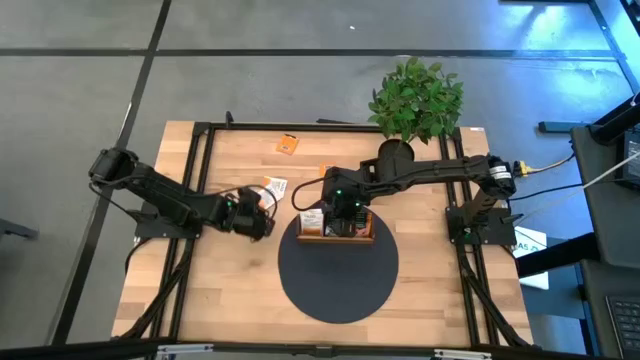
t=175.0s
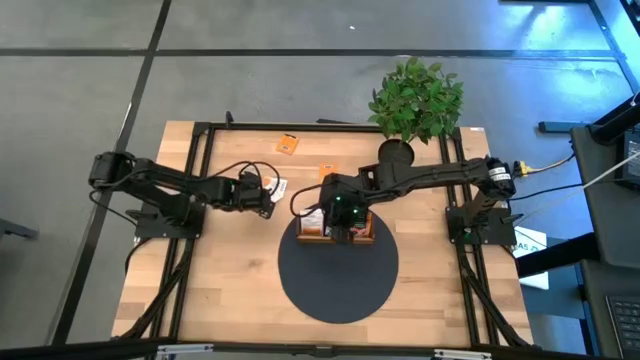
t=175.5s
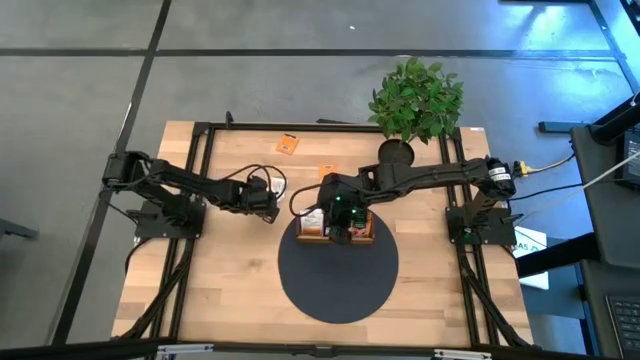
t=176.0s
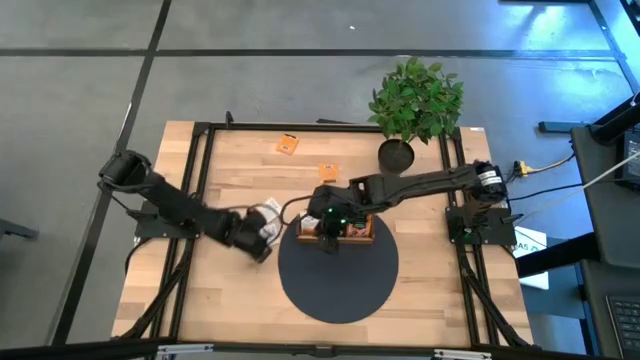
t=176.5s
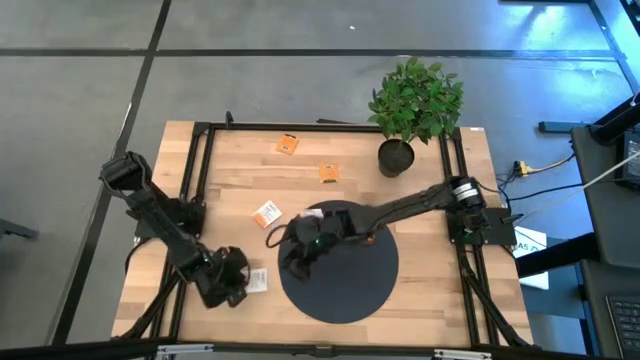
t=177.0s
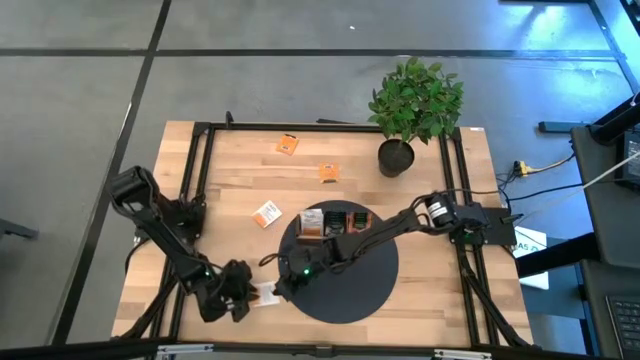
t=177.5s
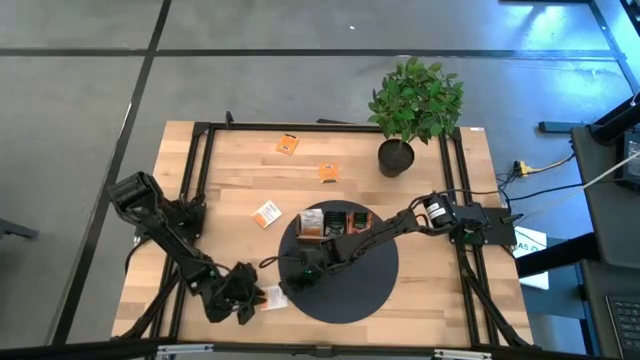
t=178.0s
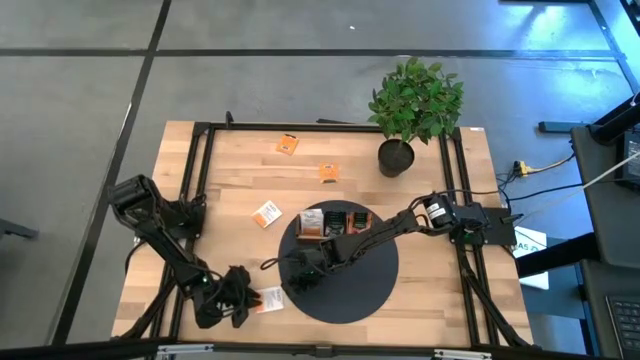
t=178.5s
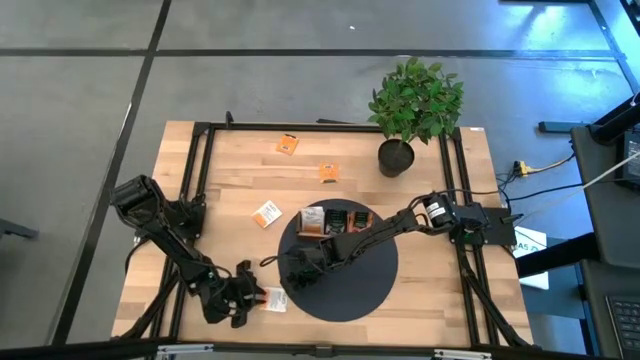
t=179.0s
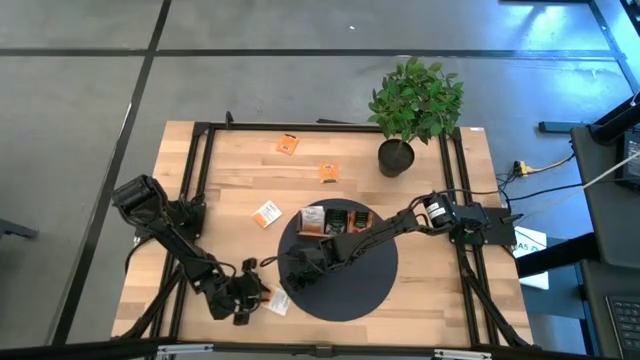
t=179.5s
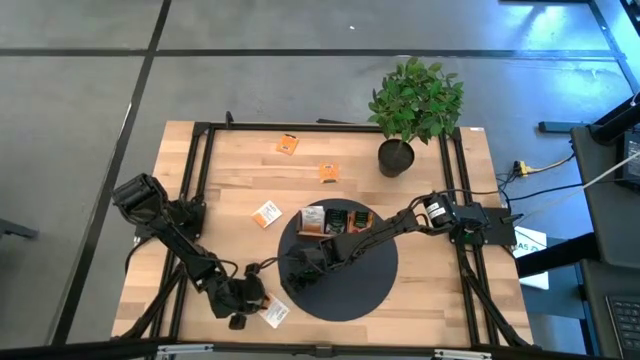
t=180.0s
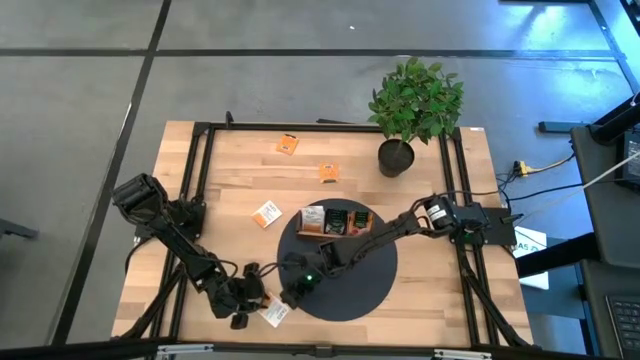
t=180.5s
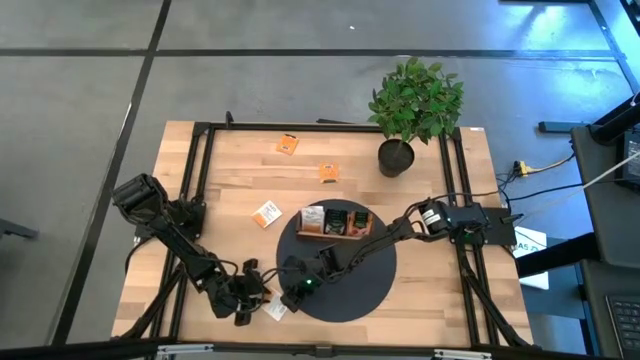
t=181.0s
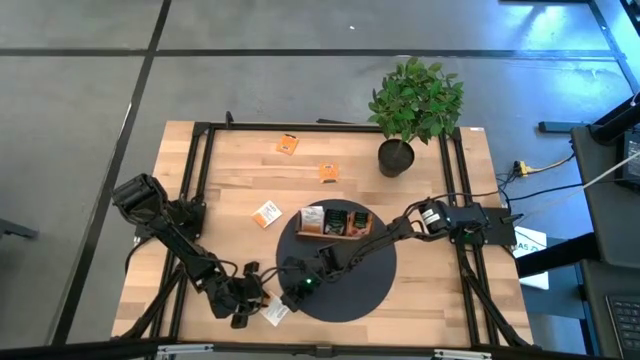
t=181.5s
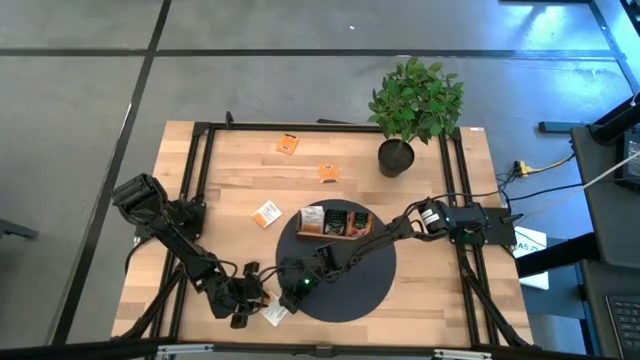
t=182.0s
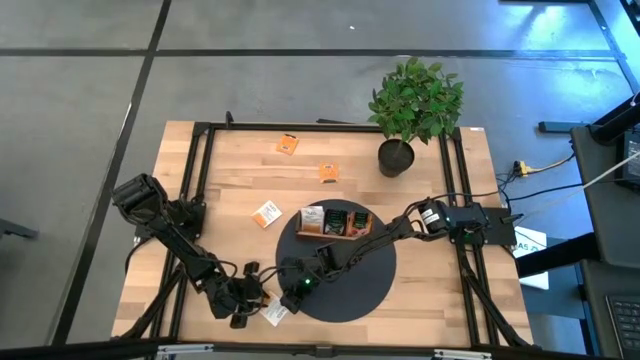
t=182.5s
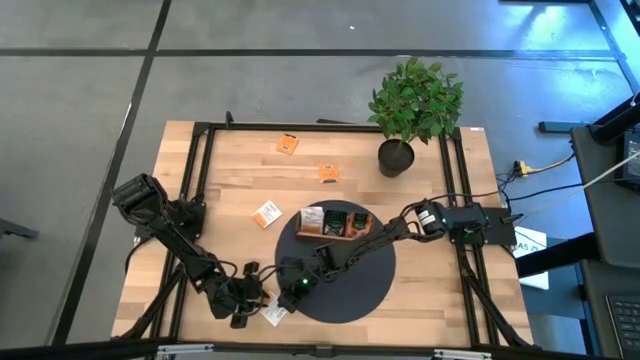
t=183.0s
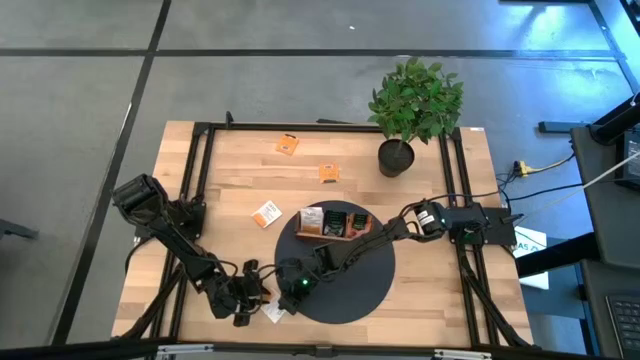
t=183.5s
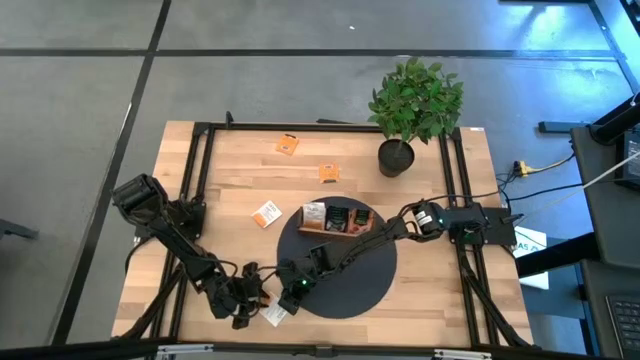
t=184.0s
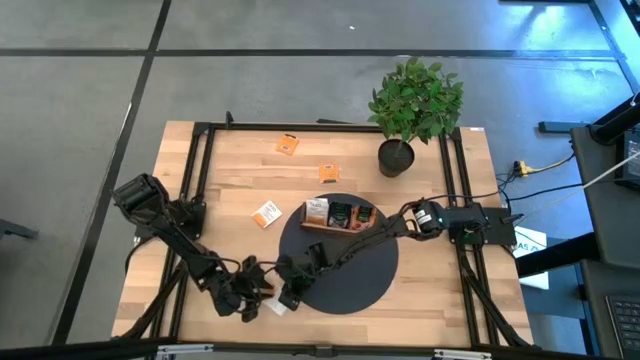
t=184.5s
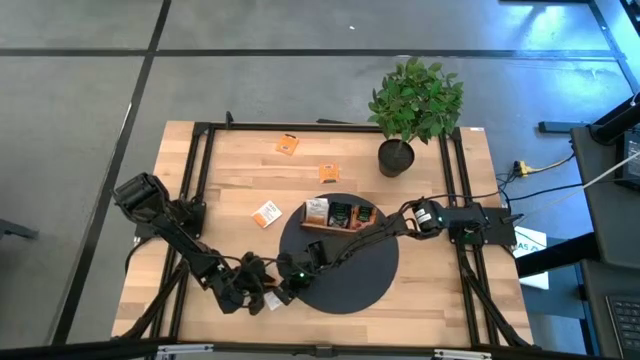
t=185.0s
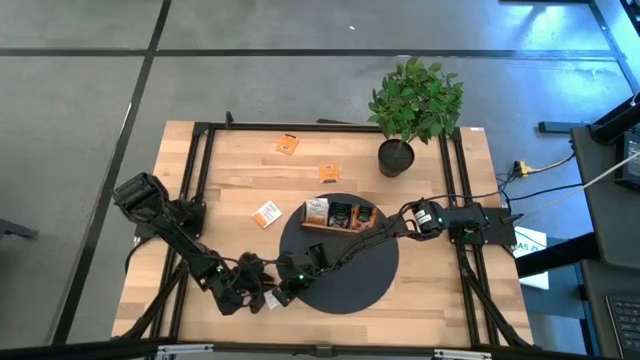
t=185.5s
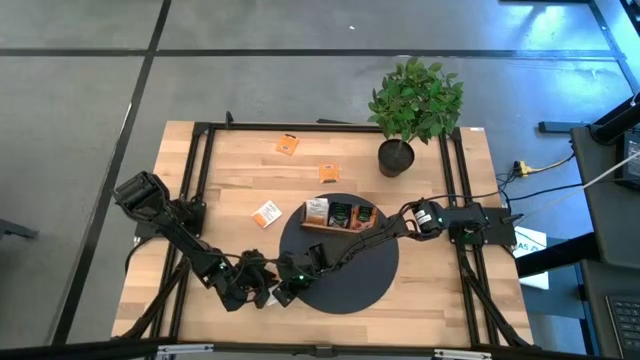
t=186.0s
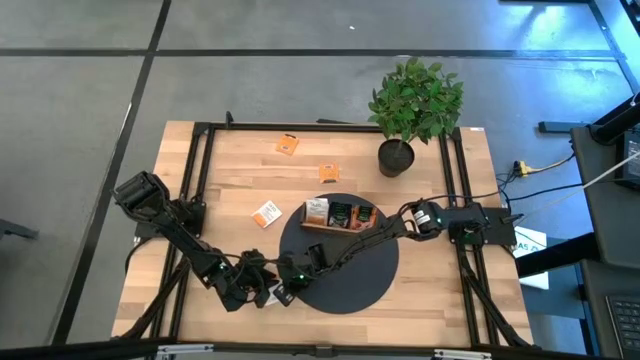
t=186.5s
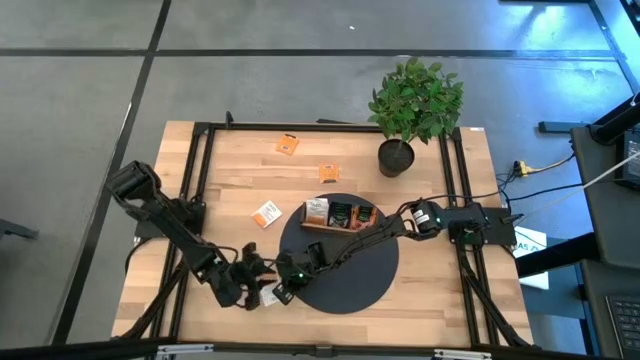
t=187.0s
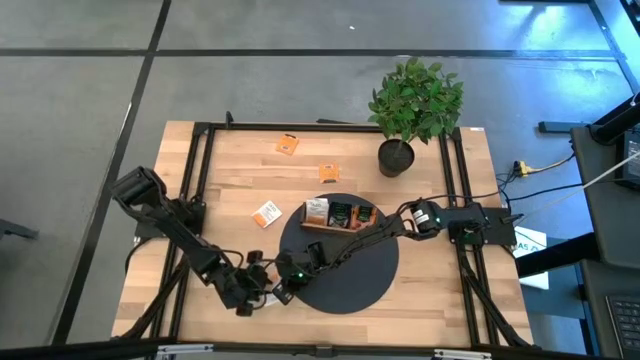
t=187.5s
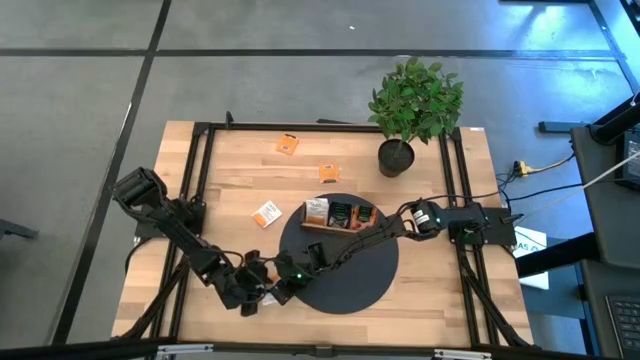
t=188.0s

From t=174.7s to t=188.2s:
Task: Pick & Place Tea
Put the white tea bag into the left section of the wooden organizer

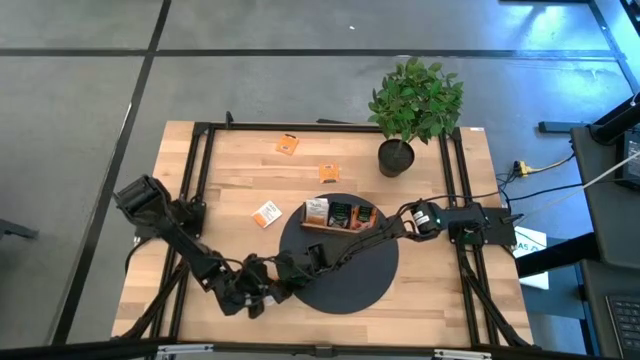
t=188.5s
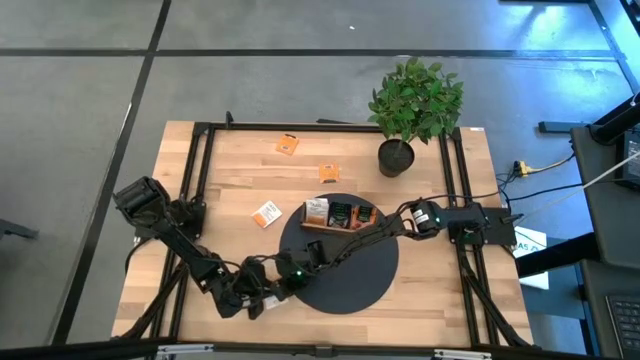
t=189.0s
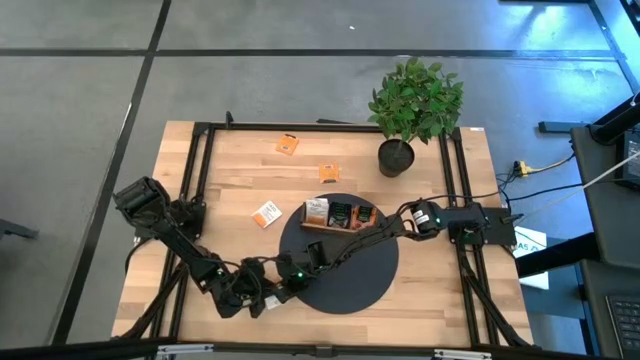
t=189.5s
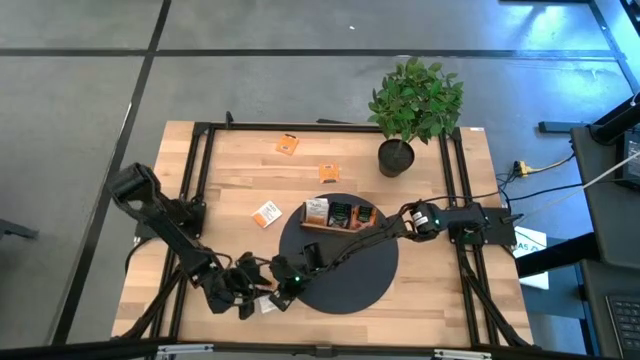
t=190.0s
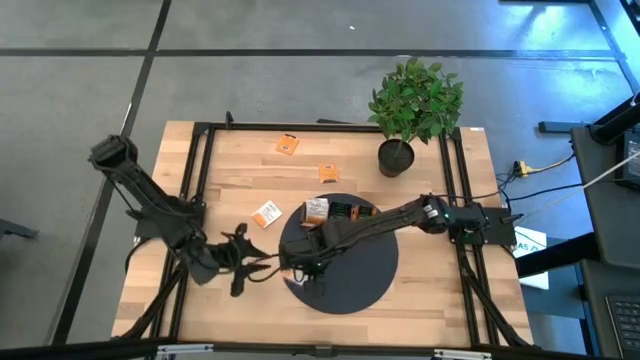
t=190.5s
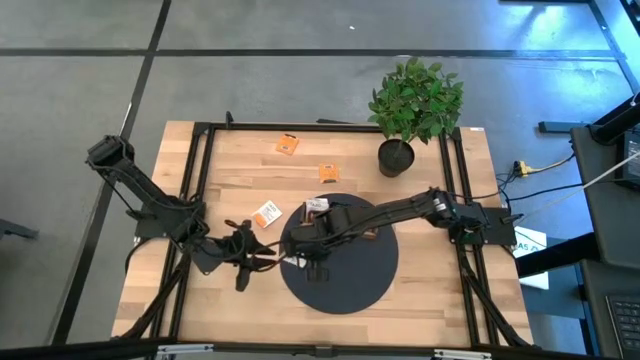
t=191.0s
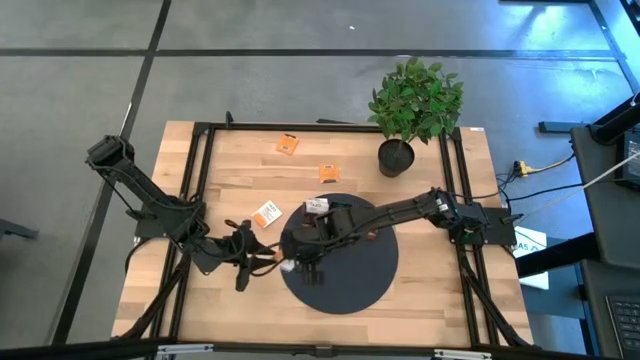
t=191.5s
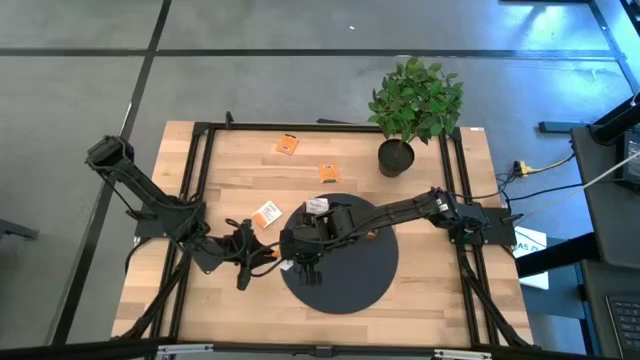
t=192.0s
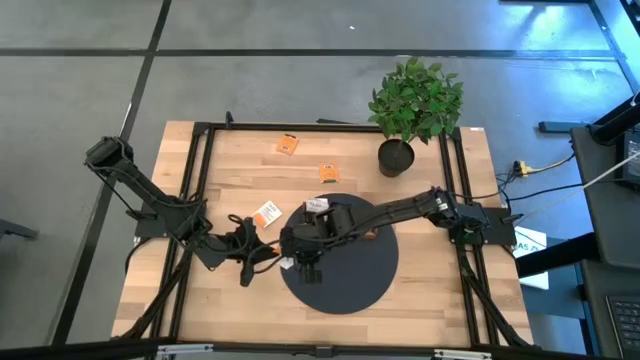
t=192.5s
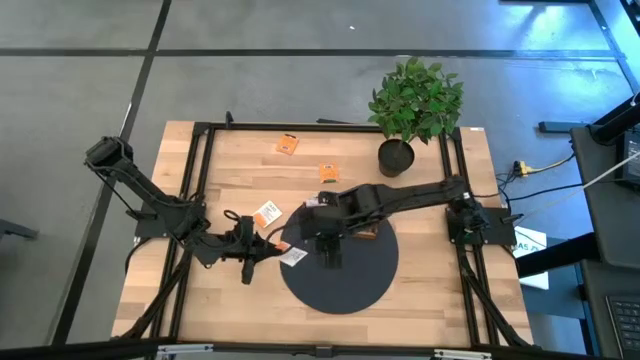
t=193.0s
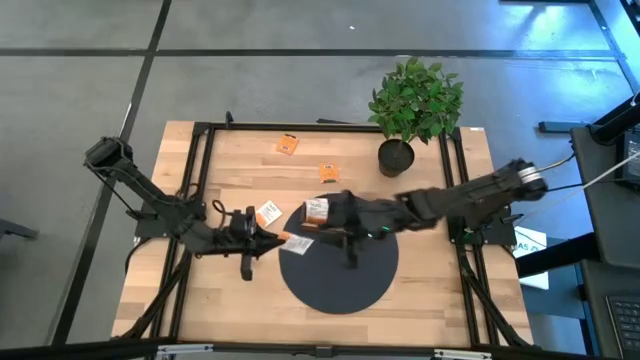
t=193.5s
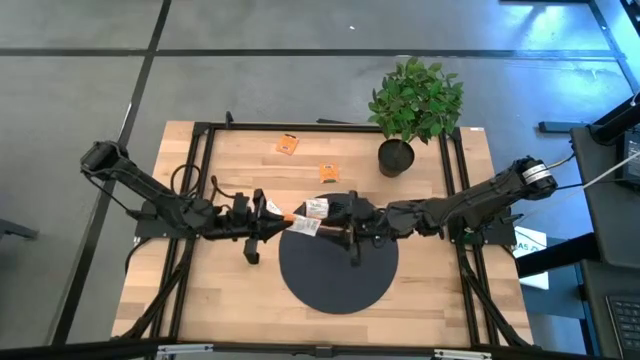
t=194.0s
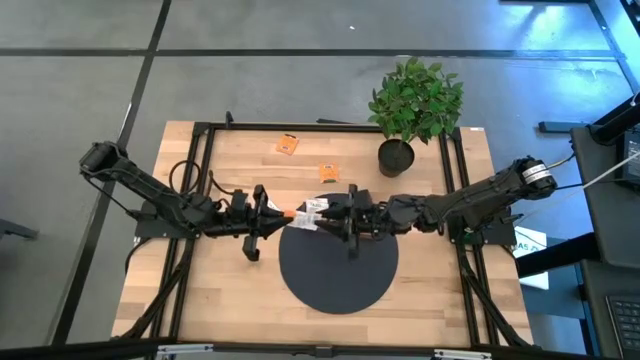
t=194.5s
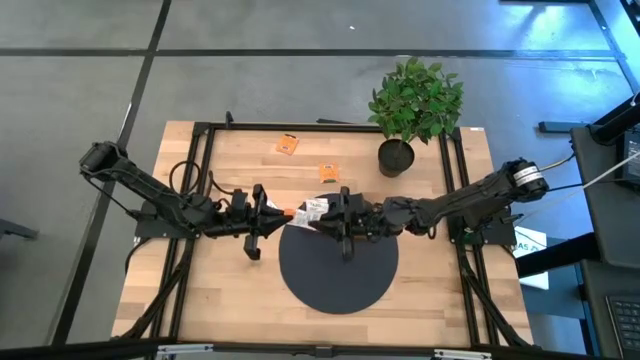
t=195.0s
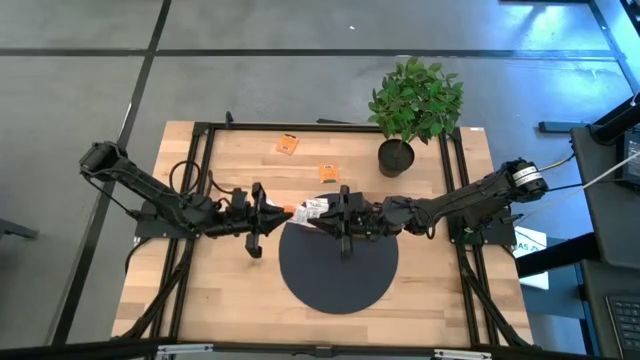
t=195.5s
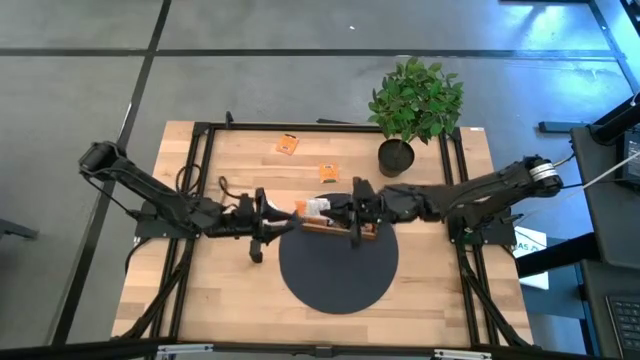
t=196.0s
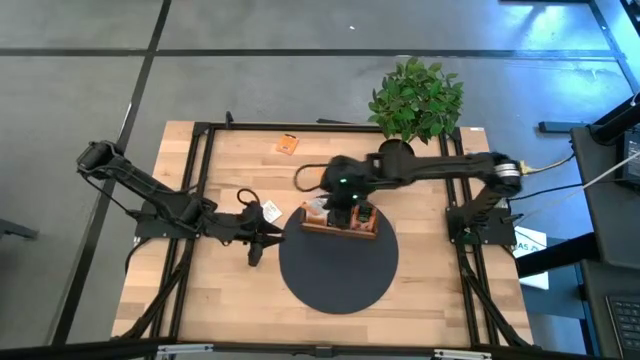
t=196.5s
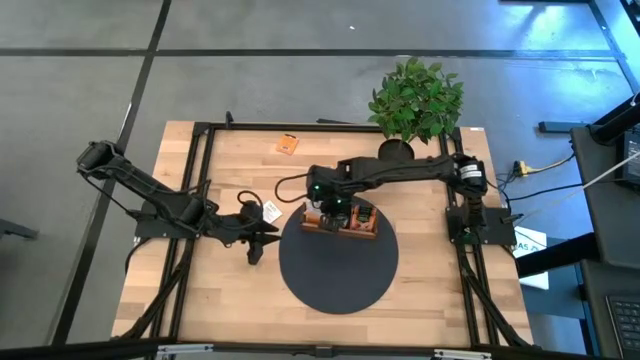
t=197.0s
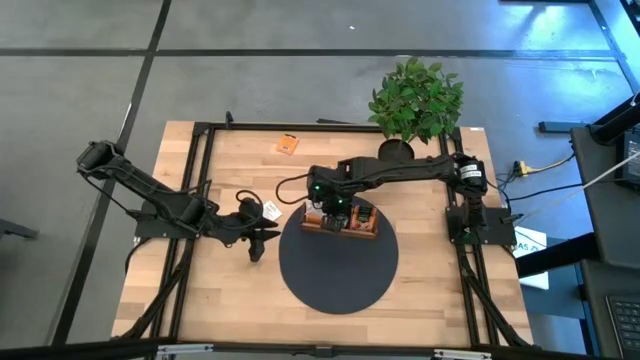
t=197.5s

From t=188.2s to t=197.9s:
Put the white tea bag into the left section of the wooden organizer
